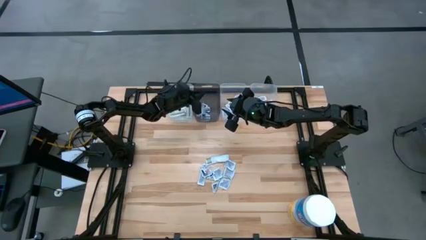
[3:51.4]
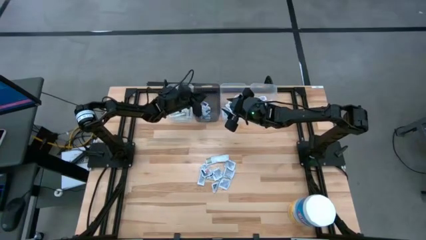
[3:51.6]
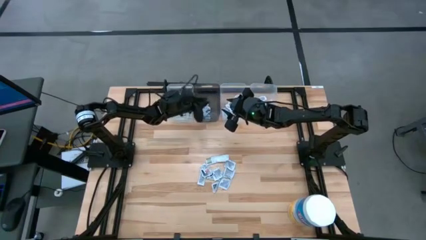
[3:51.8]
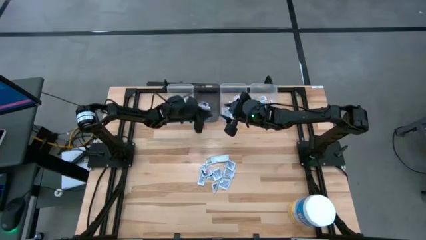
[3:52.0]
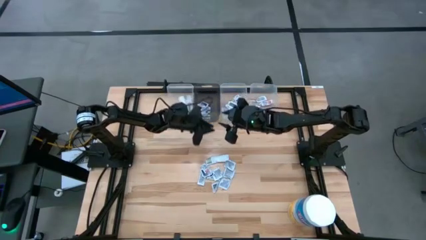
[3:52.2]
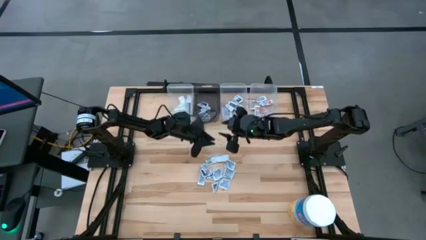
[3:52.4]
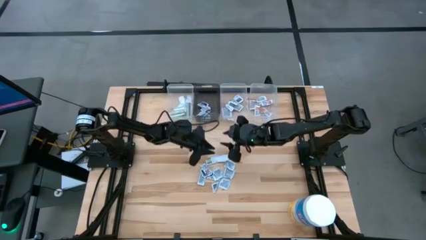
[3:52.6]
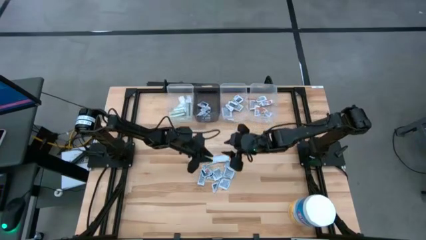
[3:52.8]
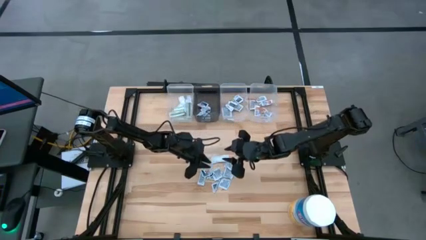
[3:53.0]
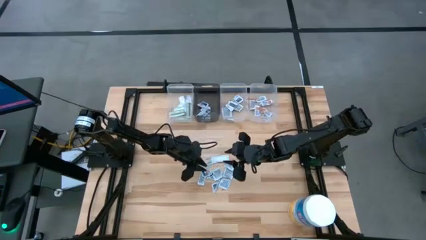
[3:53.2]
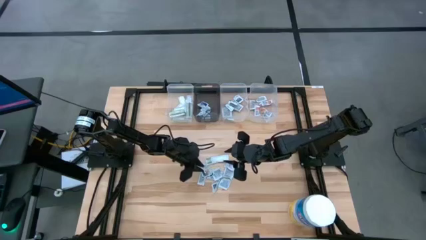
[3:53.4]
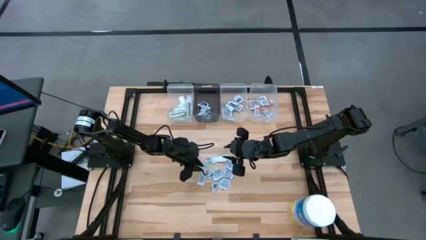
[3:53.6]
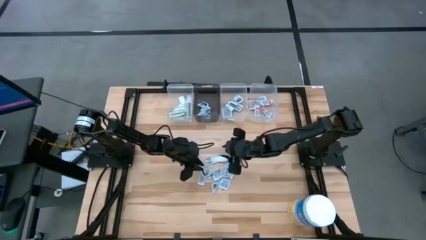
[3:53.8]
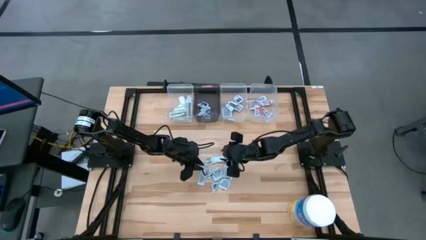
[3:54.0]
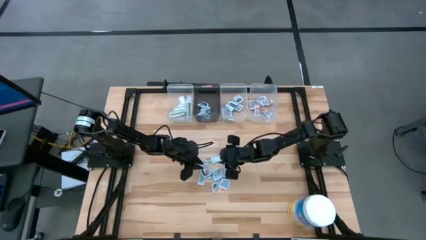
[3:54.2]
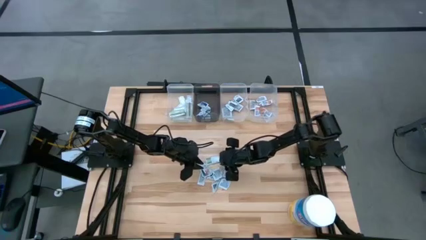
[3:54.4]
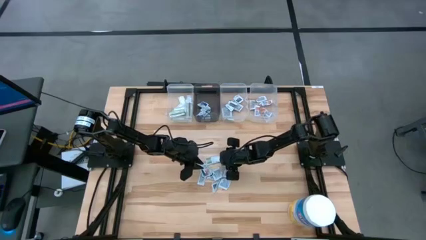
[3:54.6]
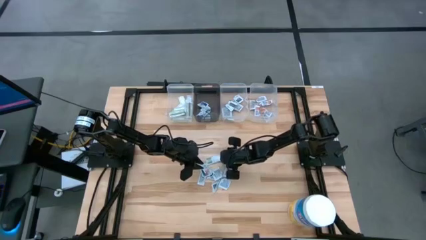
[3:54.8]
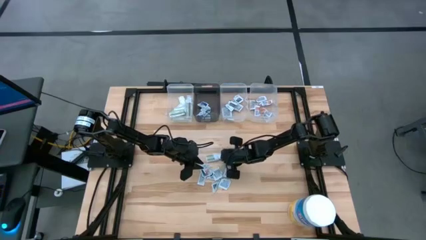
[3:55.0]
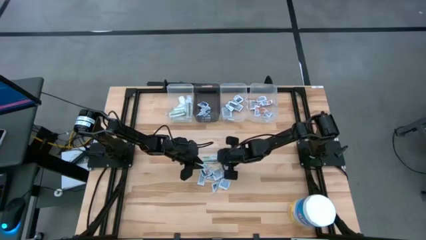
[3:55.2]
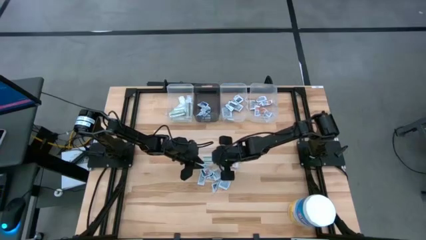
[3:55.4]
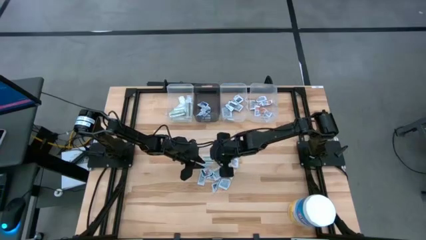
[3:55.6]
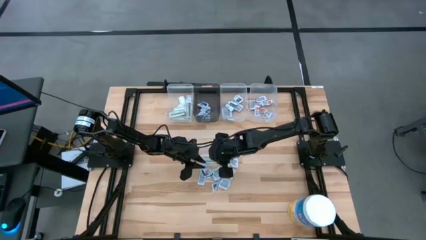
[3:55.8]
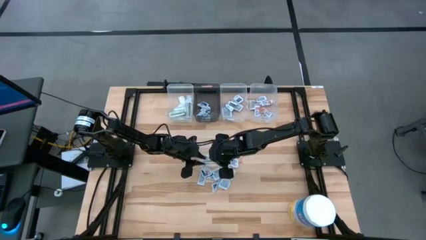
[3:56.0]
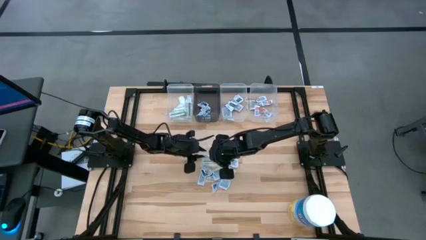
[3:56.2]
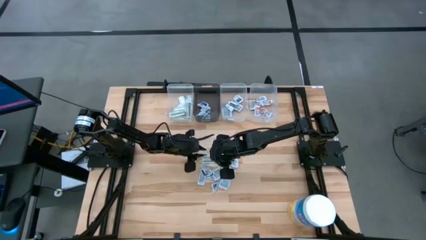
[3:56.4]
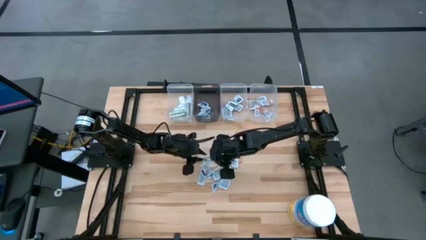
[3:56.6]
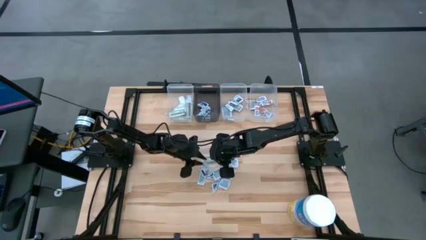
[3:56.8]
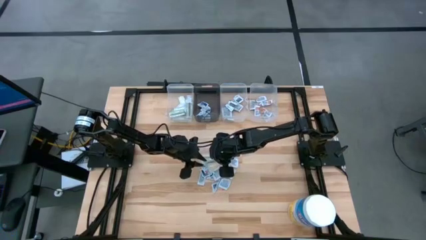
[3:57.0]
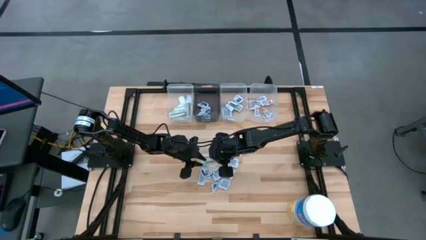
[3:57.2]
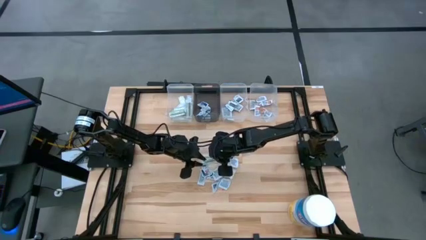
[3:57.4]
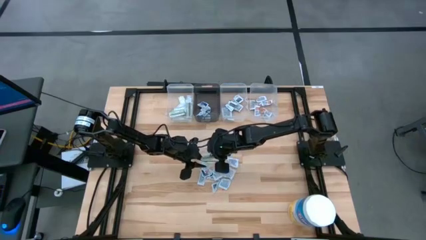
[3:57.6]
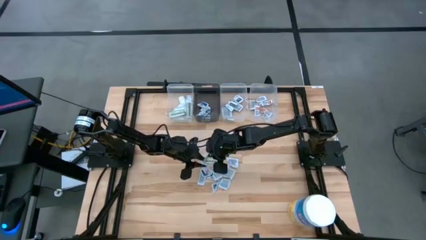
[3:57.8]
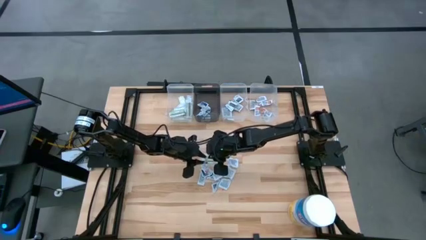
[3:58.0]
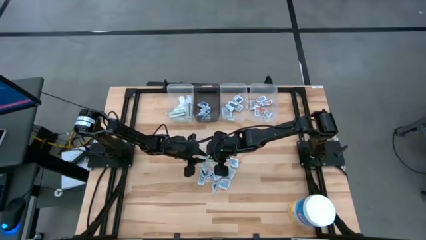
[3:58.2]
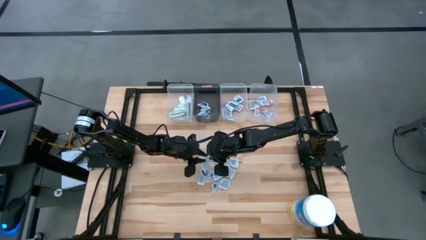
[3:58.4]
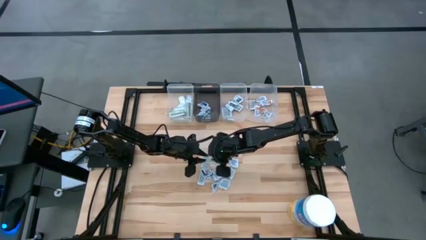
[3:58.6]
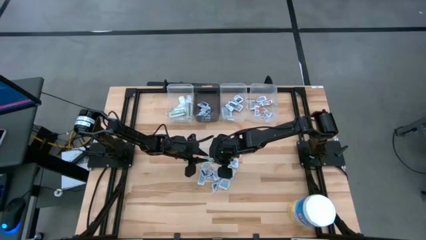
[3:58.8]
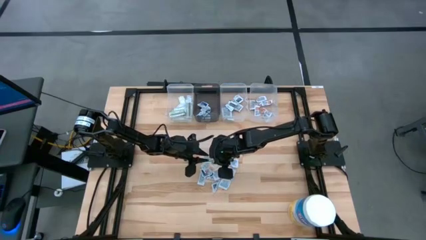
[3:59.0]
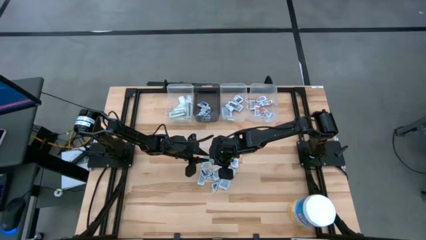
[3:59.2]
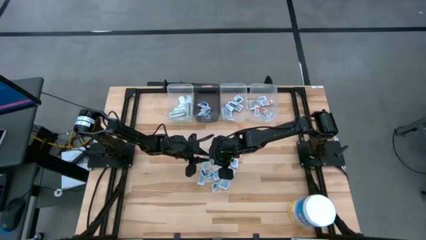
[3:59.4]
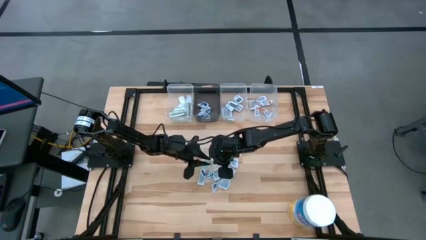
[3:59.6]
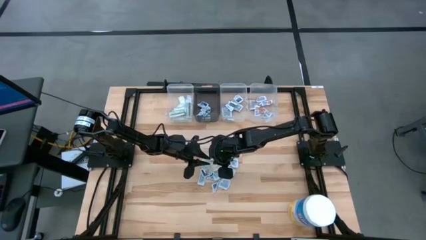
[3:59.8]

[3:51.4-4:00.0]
Task: Pick & Place First Aid Supplies
Put the bandage into the left transparent bin

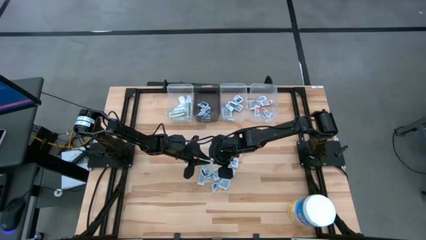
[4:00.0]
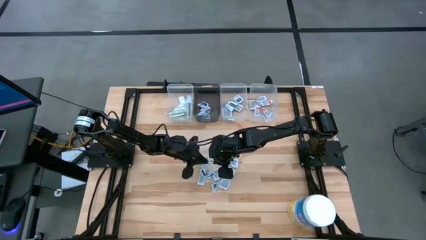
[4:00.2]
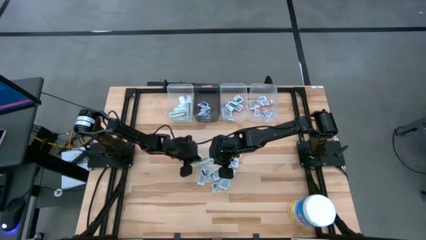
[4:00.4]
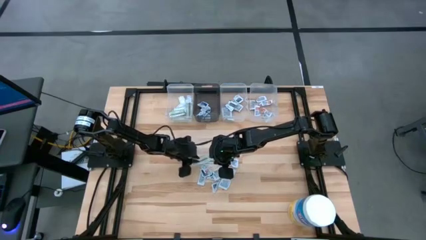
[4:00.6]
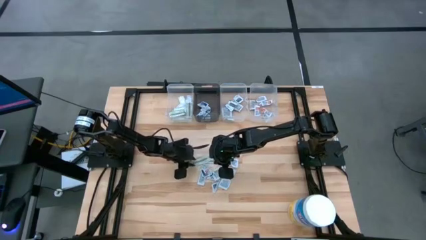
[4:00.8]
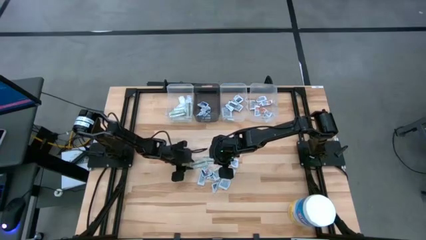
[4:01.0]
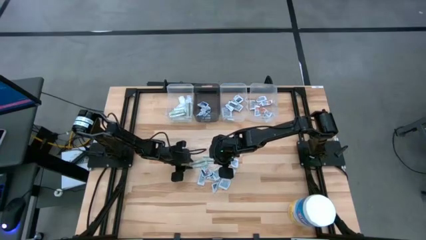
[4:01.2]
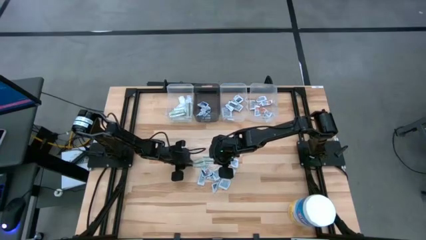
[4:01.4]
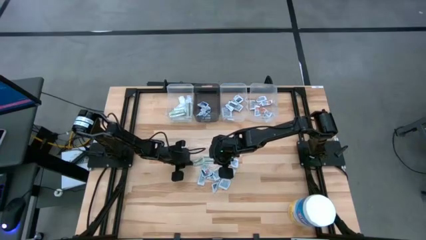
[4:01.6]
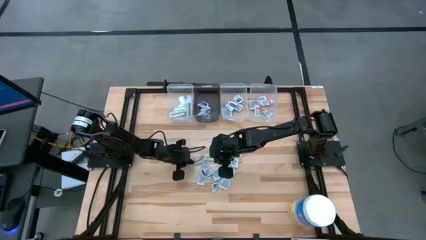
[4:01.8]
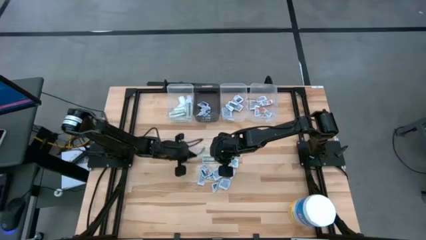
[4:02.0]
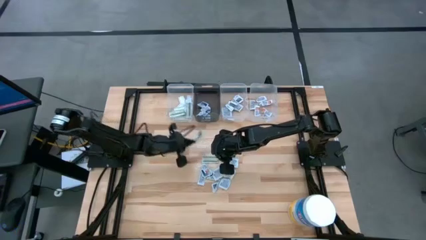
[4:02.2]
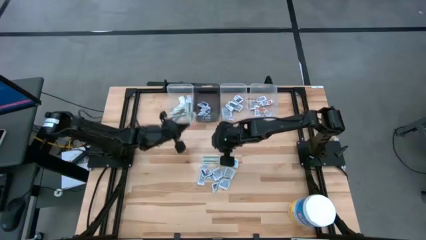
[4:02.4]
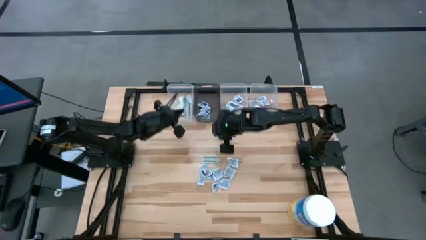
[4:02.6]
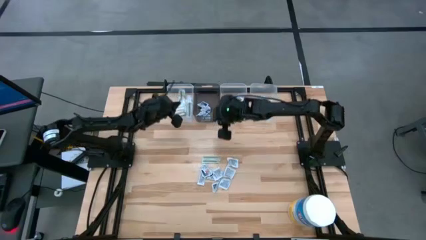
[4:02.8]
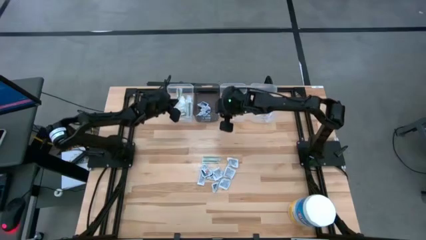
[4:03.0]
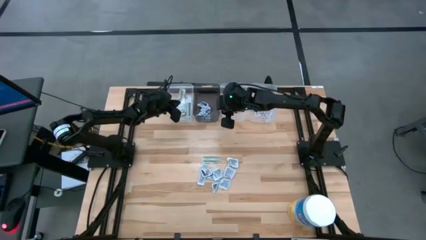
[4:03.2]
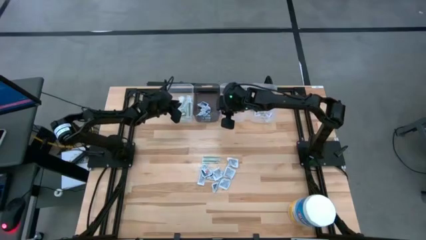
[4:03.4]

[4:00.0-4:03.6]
Put the bandage into the left transparent bin

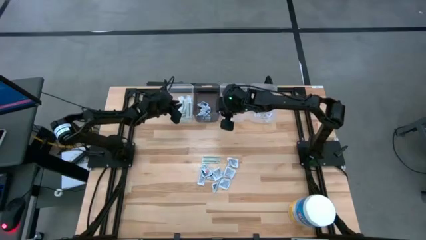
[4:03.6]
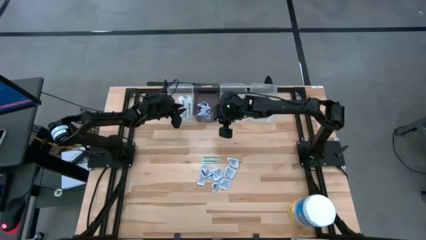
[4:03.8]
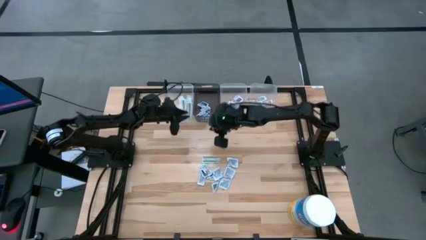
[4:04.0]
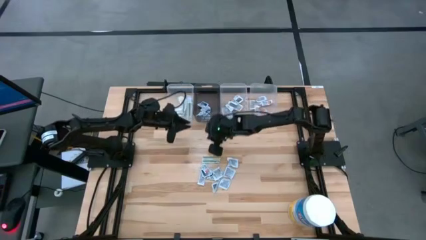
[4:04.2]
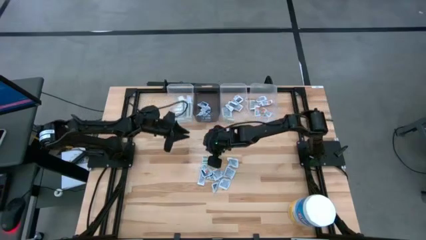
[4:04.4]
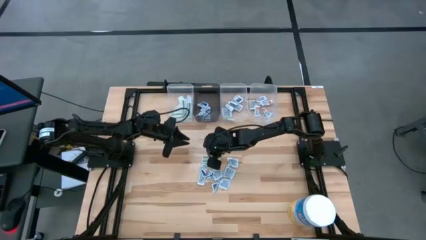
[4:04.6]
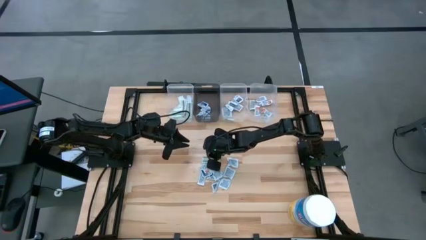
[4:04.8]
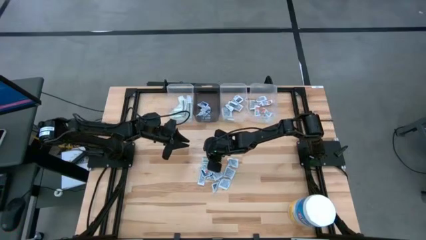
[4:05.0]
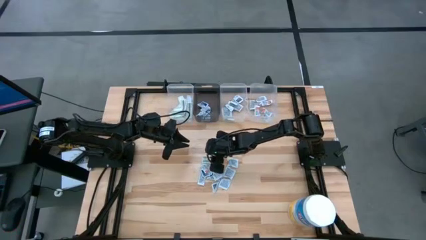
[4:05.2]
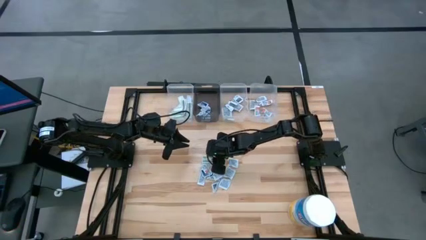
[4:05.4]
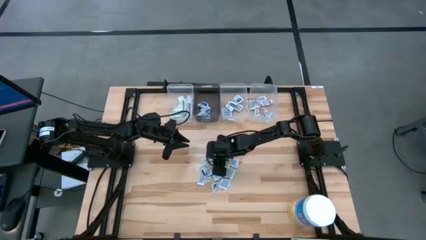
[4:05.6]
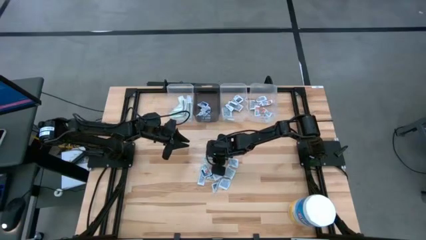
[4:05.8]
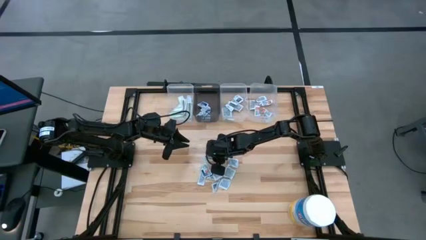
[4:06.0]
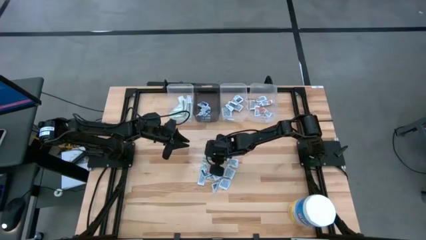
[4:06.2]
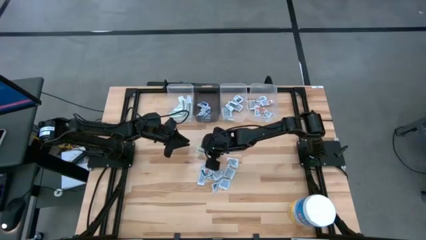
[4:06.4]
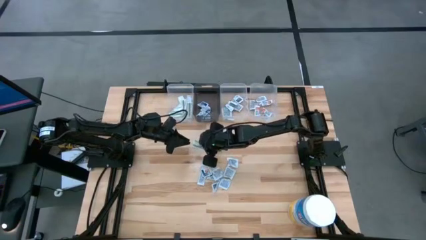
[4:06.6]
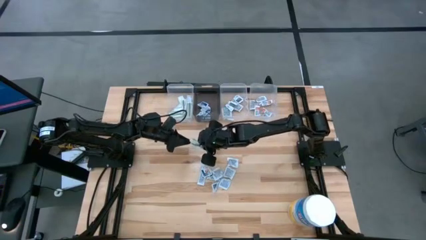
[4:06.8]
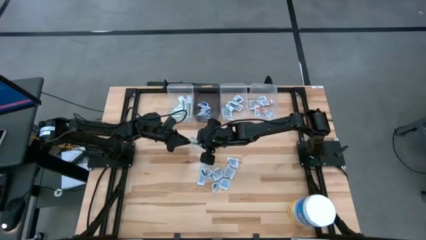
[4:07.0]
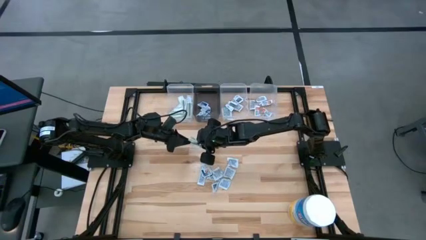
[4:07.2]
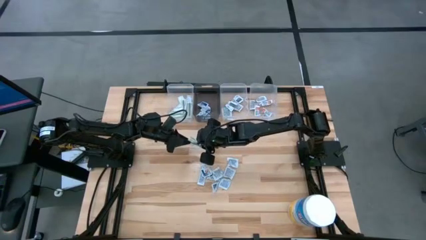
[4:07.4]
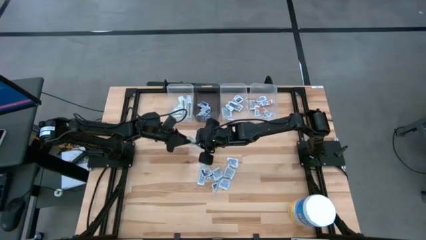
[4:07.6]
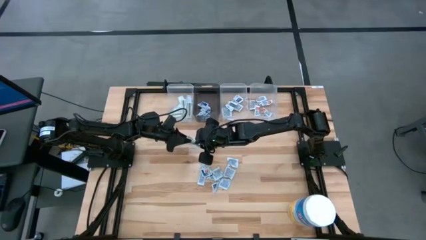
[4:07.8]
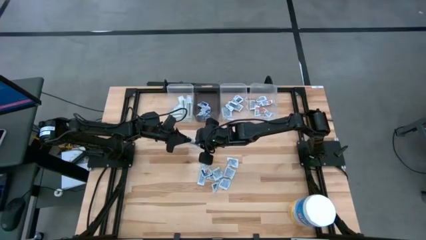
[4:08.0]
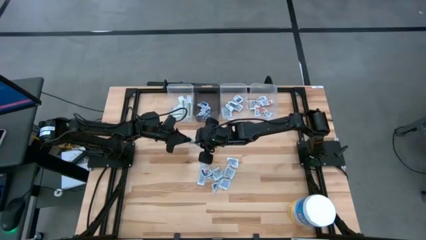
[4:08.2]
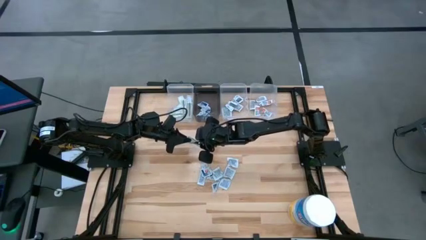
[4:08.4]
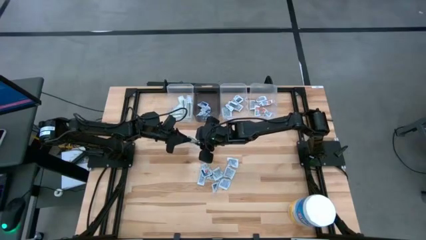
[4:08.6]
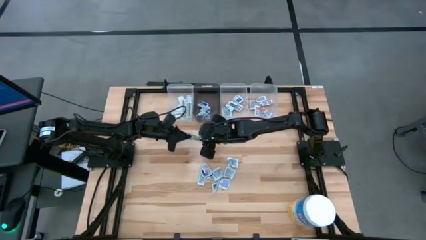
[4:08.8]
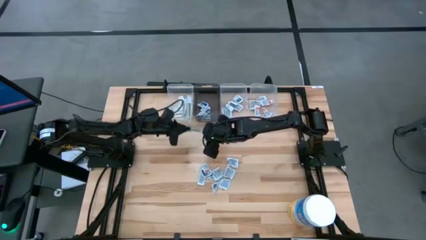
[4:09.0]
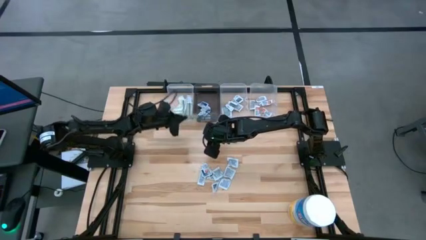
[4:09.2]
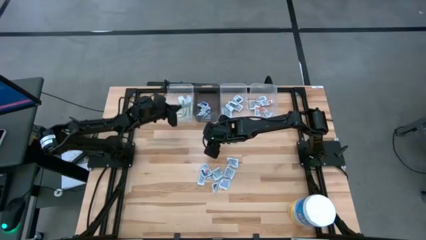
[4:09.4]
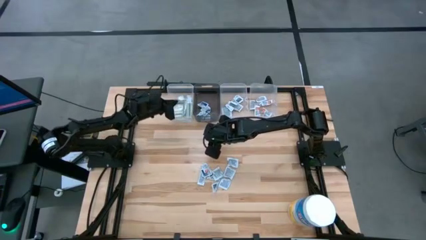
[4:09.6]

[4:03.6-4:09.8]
Put the bandage into the left transparent bin
